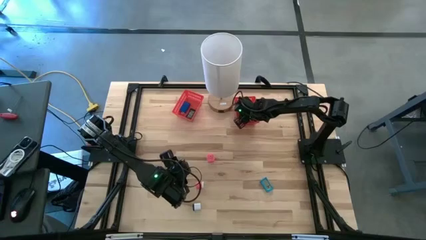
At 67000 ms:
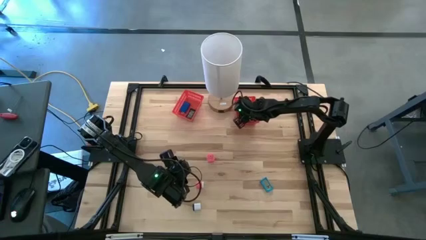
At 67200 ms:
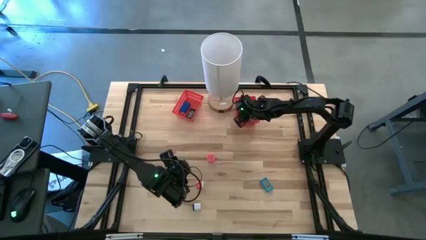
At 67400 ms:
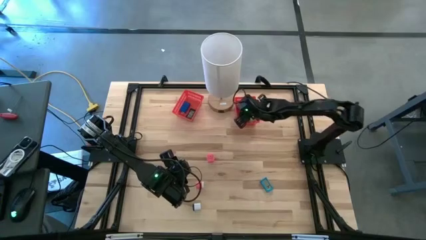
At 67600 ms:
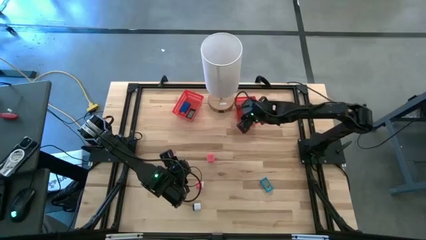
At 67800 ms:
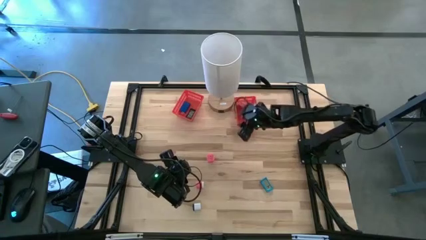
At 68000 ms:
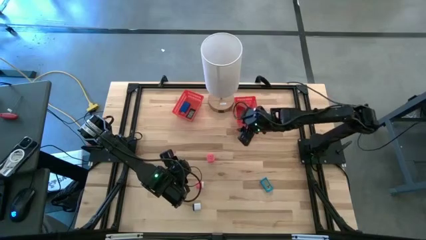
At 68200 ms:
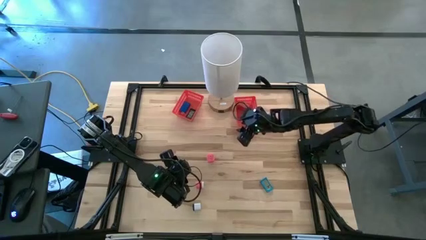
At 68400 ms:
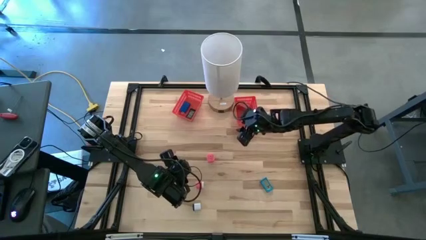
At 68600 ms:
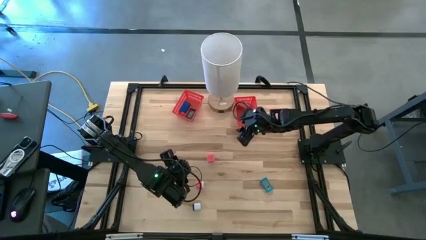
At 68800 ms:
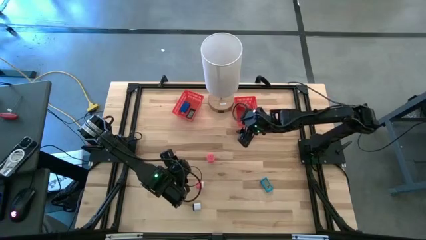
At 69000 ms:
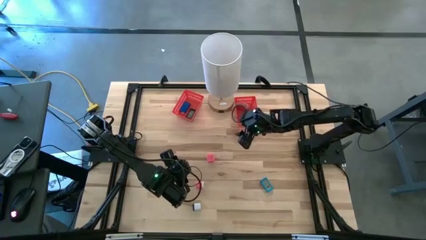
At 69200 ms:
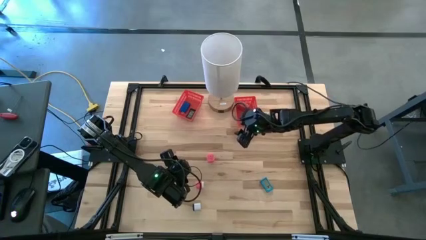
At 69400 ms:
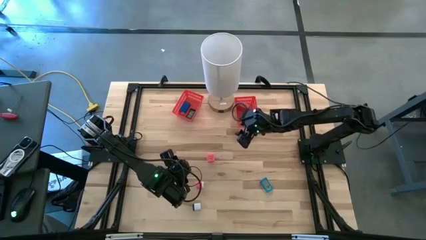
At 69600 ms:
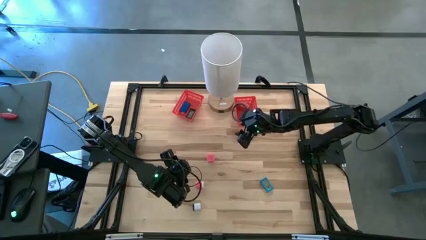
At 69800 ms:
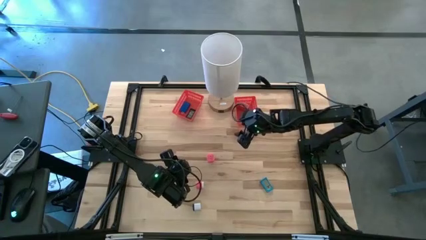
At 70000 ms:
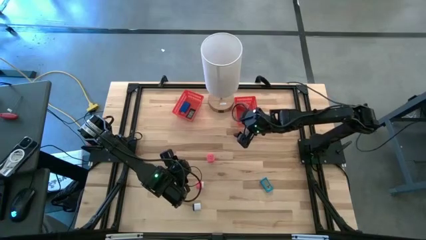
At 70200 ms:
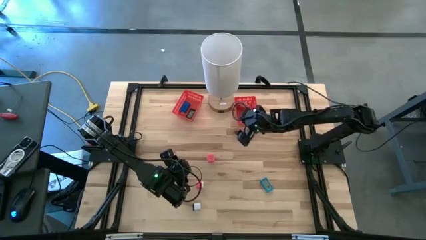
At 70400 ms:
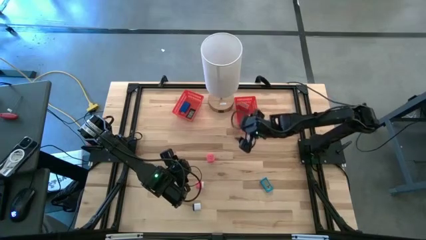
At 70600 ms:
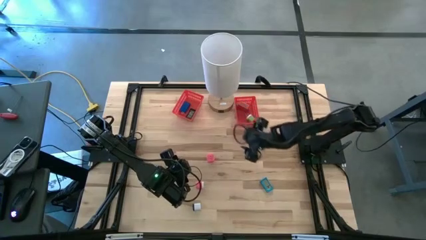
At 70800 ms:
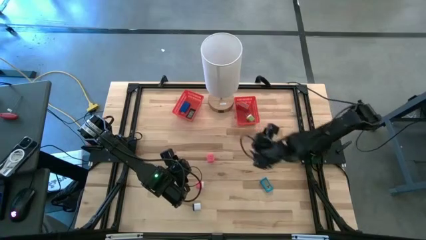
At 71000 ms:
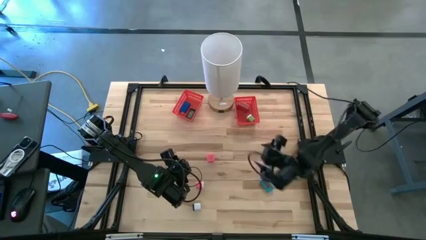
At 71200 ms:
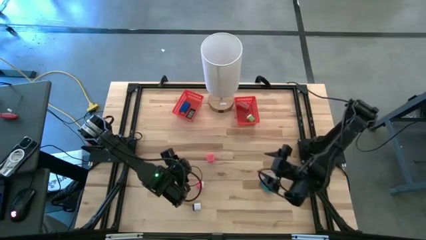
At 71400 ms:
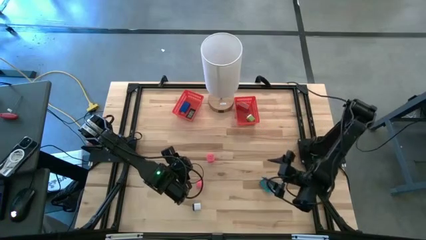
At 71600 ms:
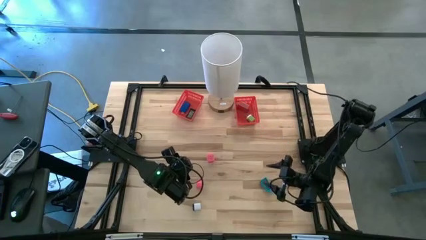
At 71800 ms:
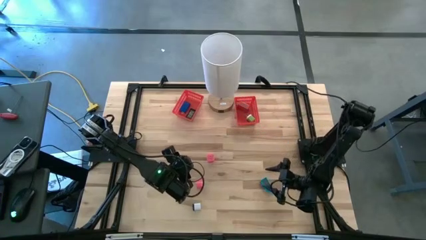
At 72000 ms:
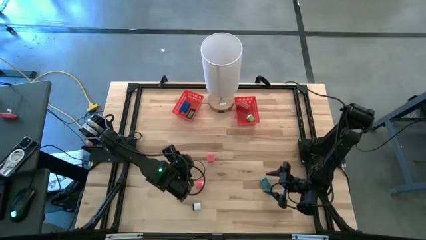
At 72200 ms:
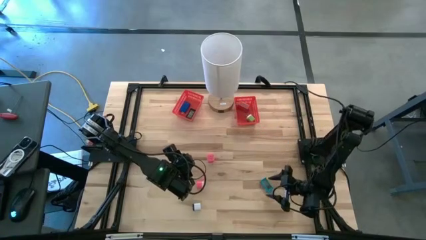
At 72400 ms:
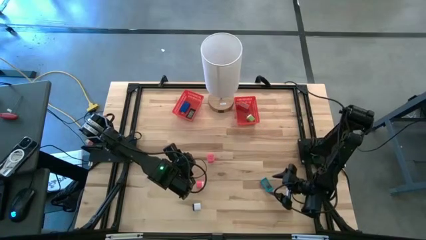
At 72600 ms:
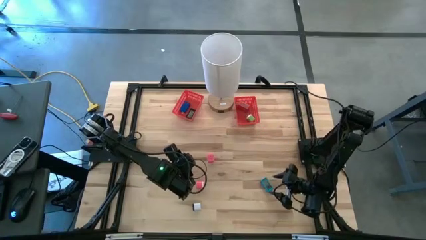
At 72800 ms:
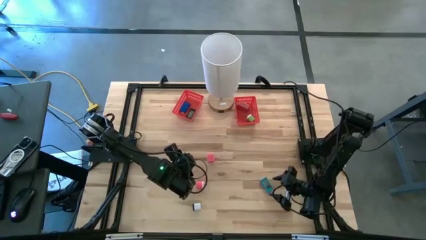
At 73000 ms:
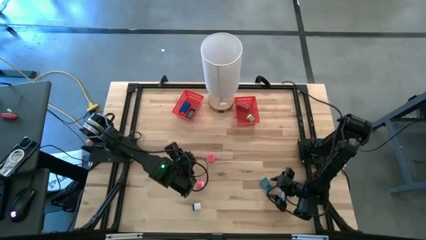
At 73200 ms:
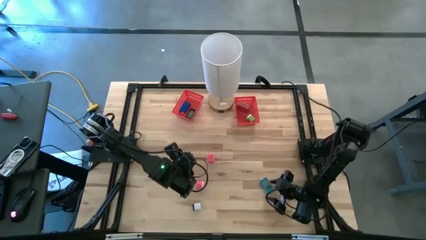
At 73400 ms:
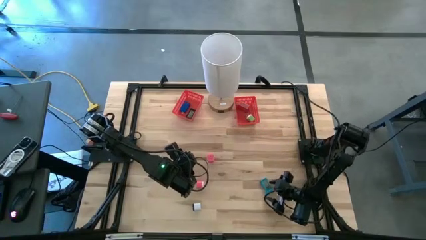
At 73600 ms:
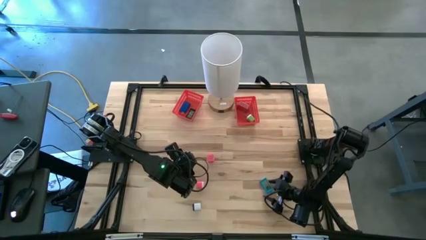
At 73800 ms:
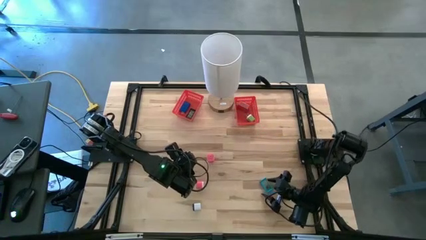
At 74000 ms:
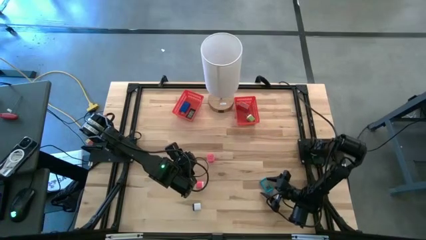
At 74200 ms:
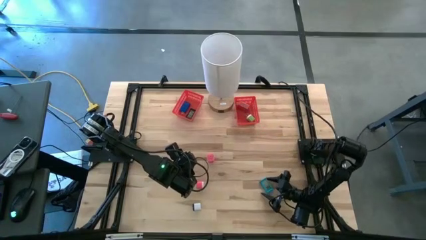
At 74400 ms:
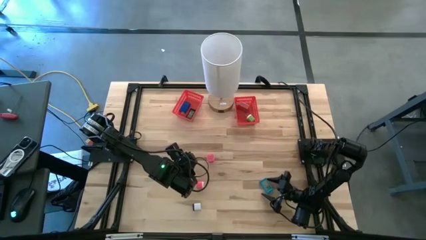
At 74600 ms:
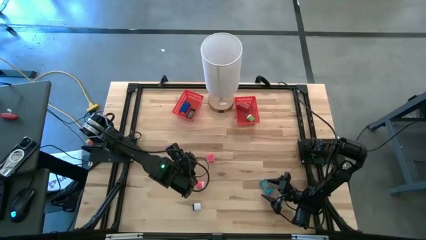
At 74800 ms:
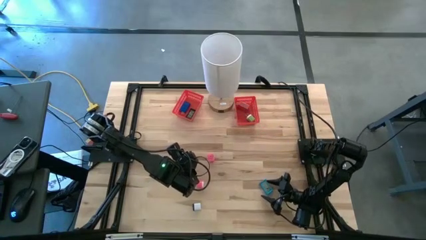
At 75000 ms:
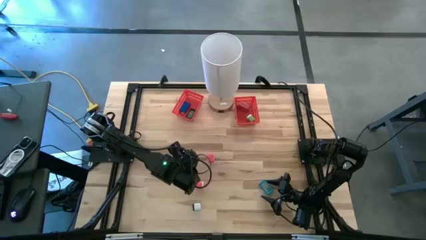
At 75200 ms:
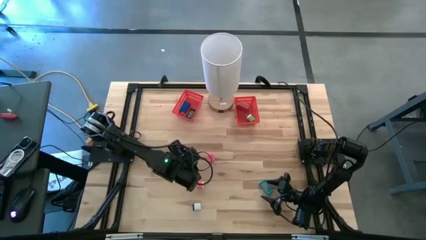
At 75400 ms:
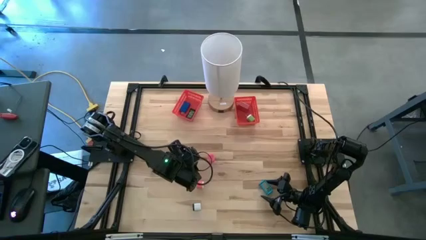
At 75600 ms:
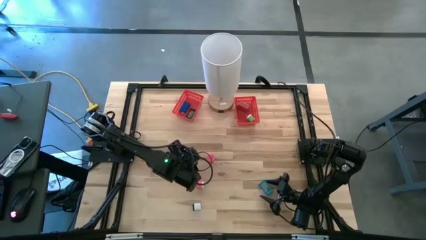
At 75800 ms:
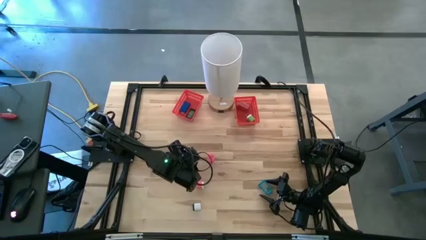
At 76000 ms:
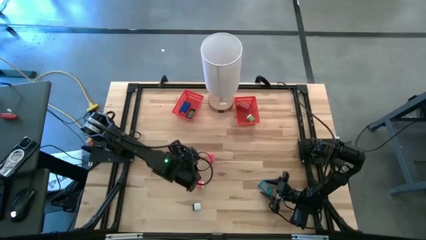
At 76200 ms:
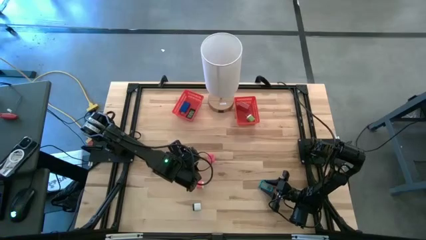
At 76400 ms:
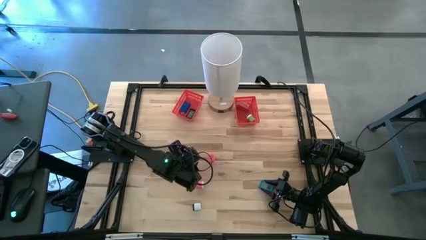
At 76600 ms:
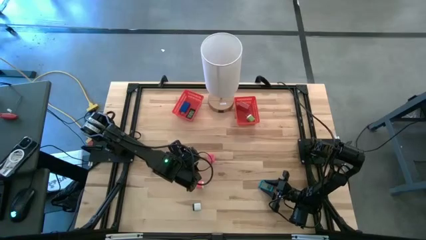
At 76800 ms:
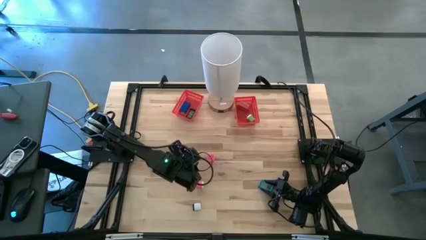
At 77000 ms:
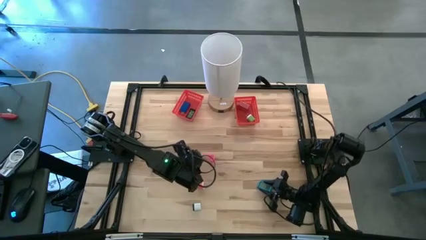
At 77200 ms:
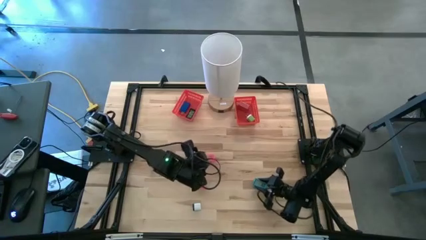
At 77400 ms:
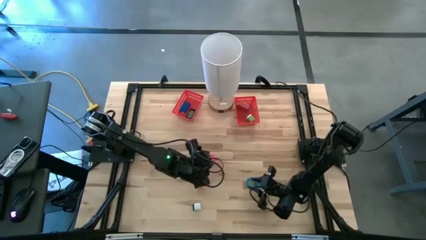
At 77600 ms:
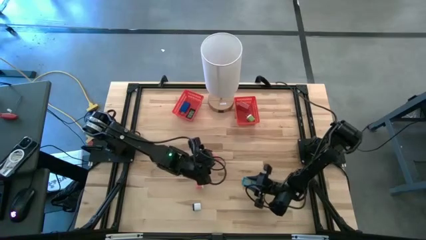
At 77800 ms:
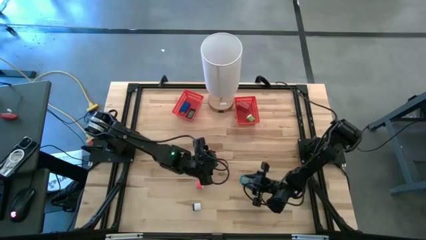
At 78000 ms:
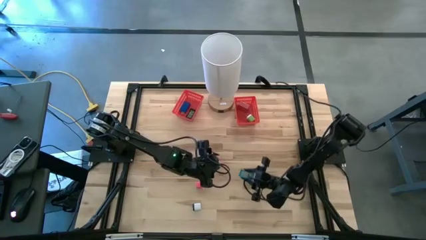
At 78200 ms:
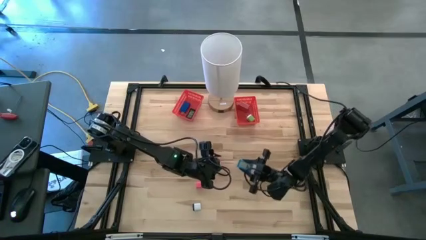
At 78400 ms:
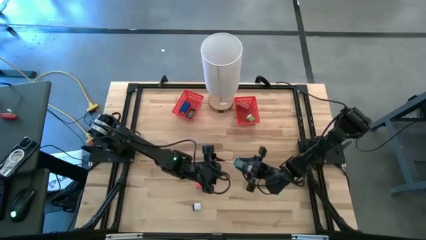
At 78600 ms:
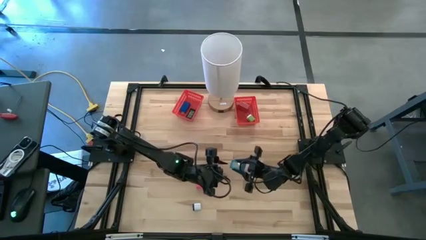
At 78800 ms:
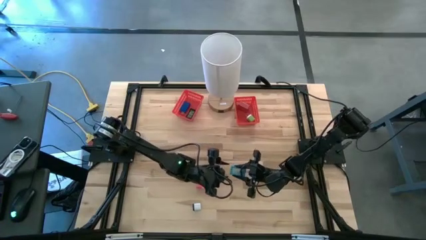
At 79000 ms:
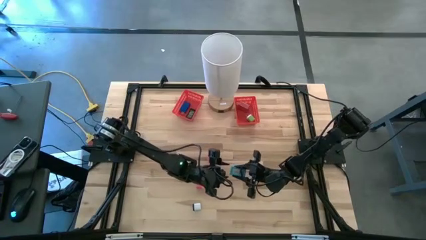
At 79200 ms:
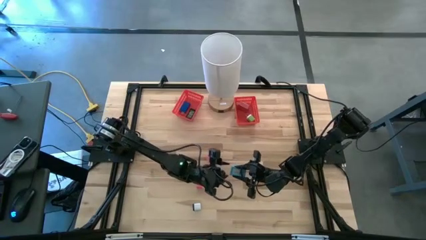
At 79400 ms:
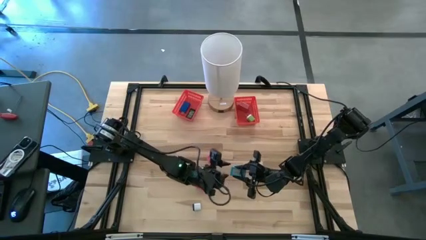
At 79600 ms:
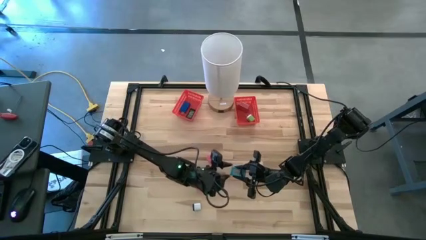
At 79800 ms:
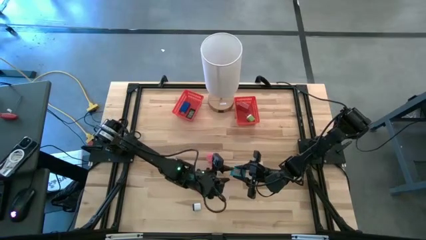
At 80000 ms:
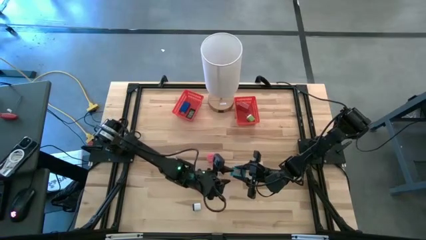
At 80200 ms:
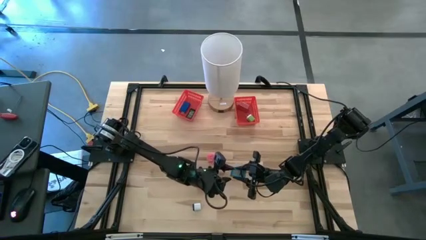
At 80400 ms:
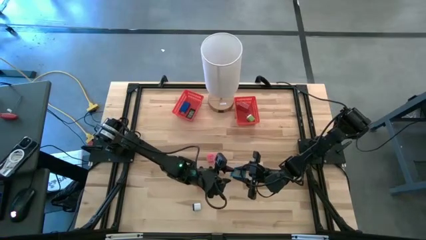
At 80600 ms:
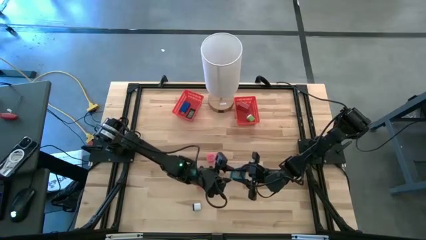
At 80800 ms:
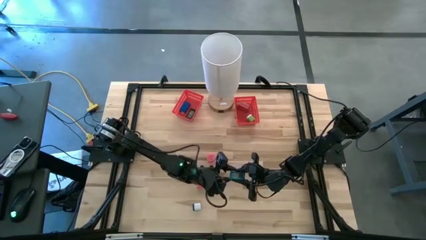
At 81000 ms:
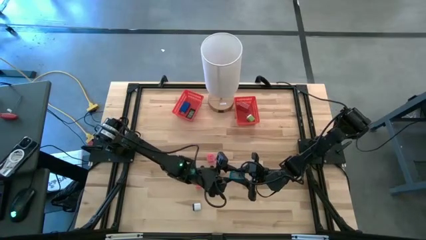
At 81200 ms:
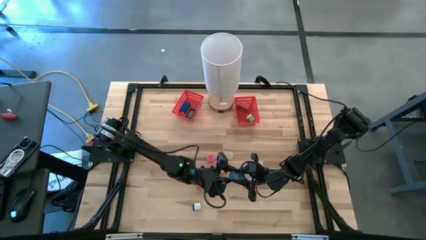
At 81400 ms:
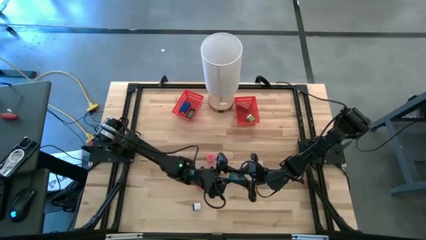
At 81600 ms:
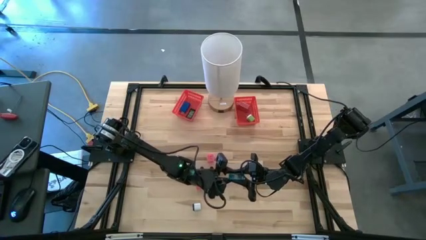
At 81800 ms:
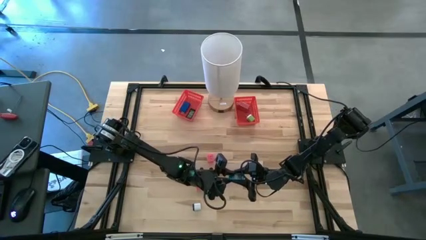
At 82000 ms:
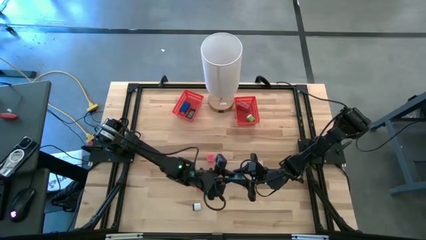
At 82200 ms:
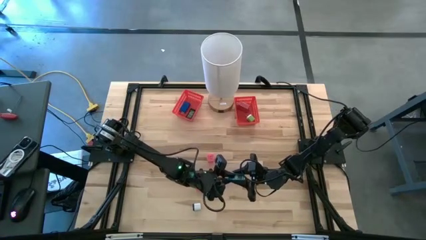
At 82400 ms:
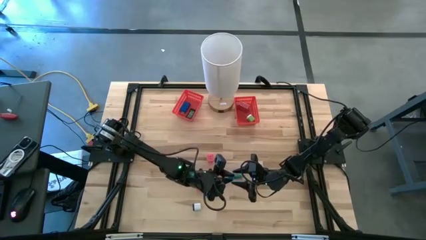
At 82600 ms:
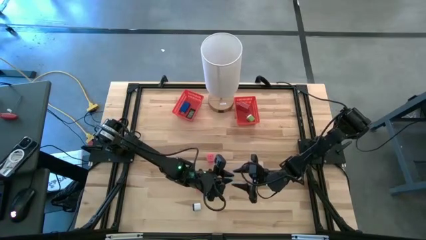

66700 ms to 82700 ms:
Task: Sort adapters and digital timers
Put the light blue digital timer into the left red bin
